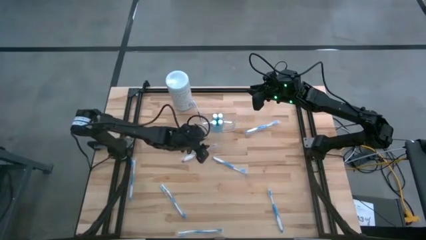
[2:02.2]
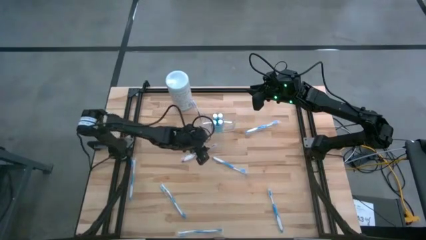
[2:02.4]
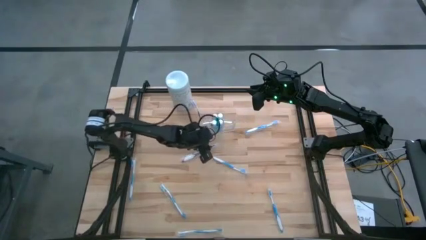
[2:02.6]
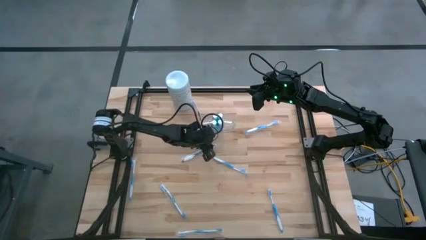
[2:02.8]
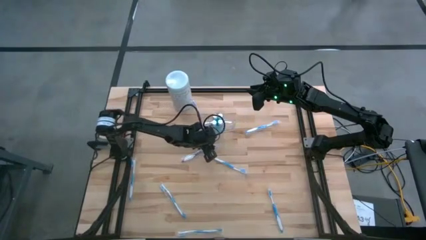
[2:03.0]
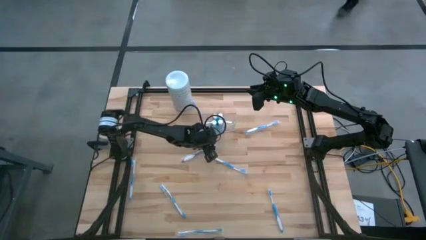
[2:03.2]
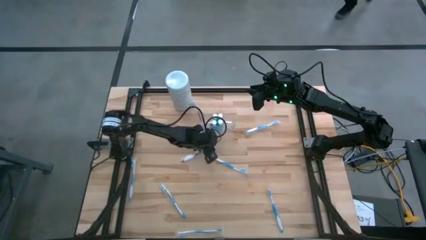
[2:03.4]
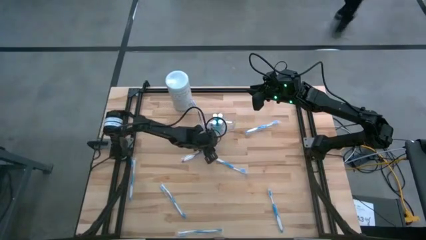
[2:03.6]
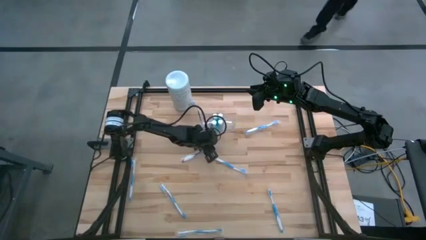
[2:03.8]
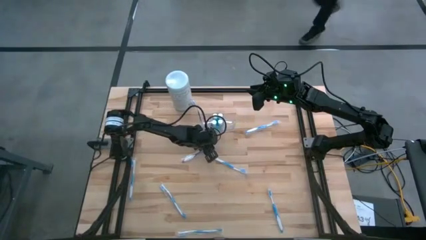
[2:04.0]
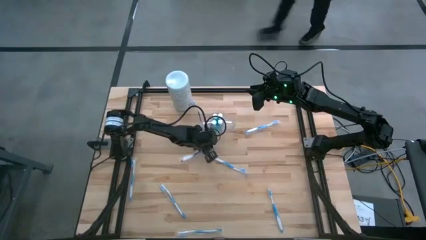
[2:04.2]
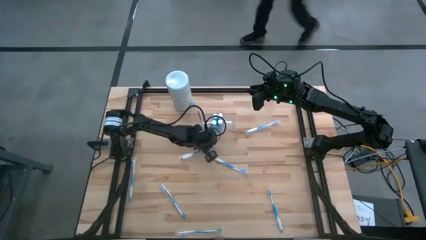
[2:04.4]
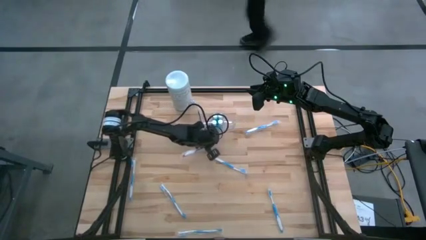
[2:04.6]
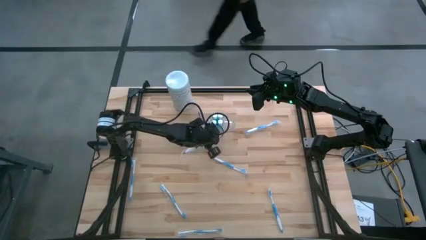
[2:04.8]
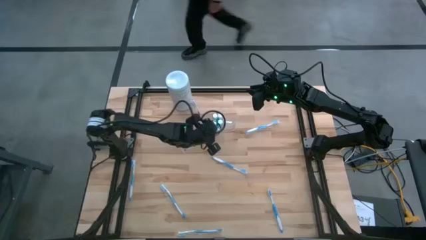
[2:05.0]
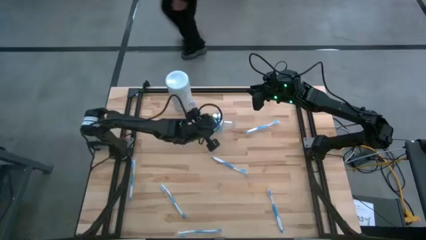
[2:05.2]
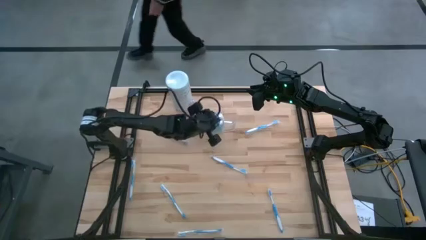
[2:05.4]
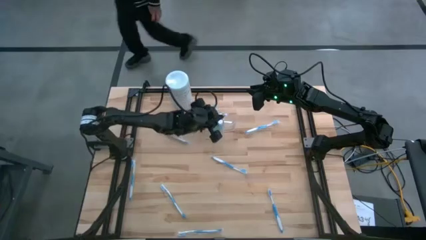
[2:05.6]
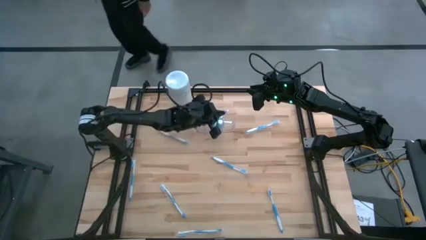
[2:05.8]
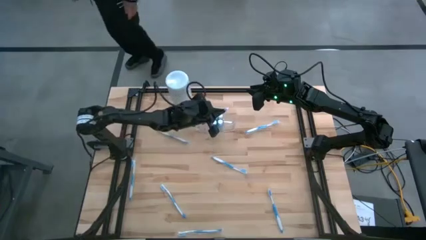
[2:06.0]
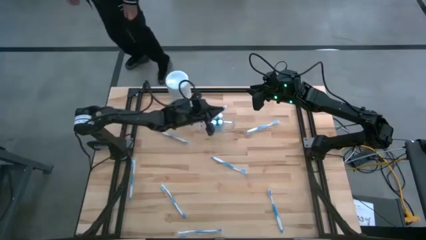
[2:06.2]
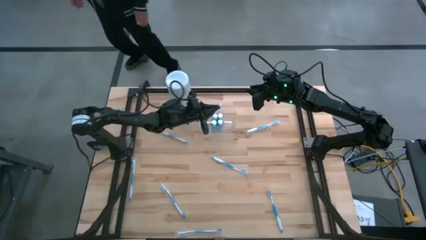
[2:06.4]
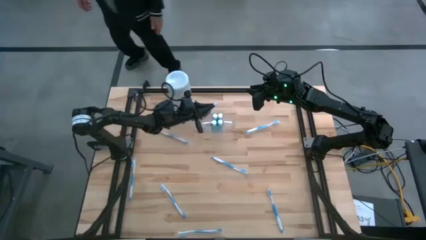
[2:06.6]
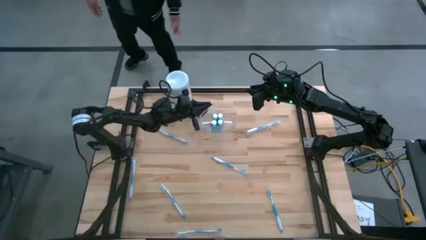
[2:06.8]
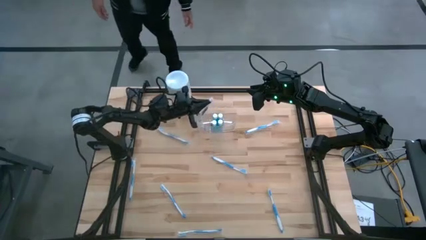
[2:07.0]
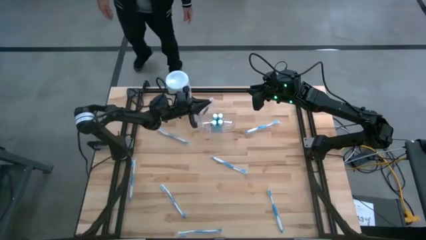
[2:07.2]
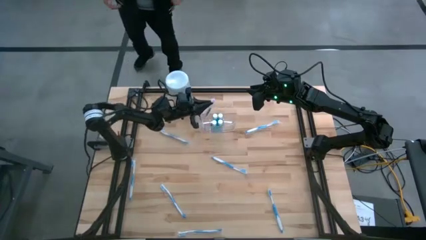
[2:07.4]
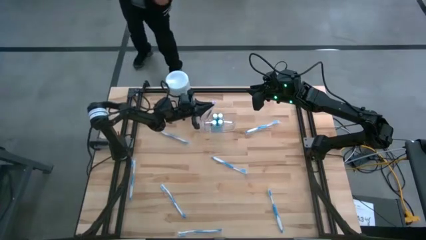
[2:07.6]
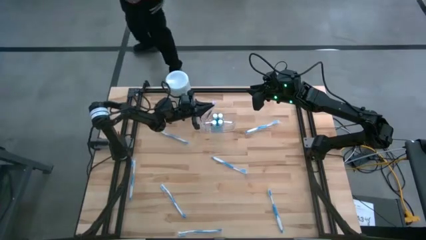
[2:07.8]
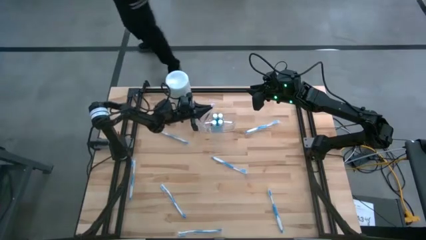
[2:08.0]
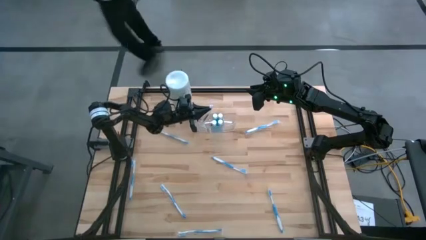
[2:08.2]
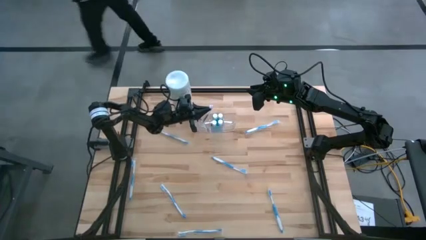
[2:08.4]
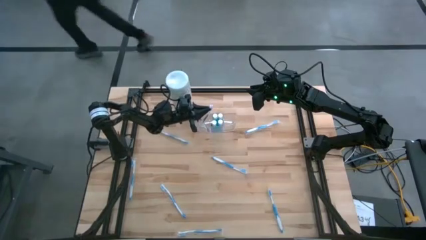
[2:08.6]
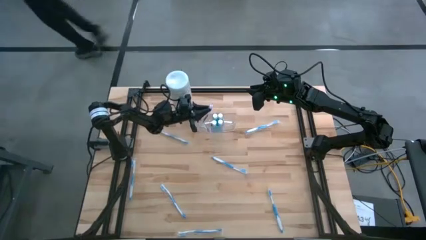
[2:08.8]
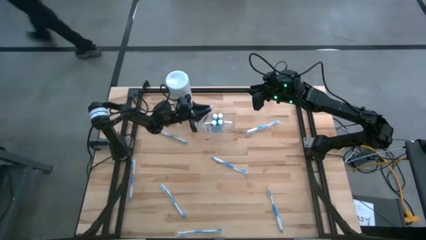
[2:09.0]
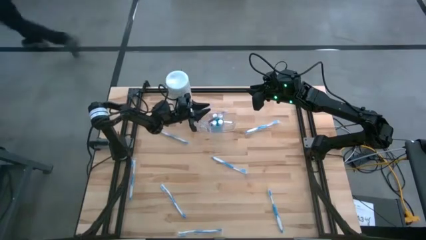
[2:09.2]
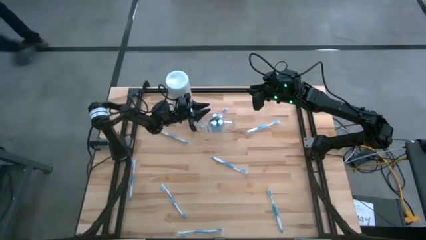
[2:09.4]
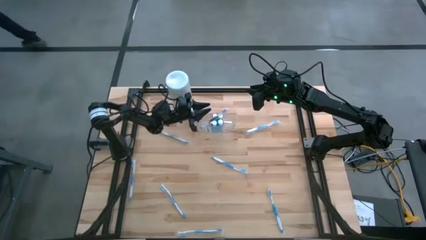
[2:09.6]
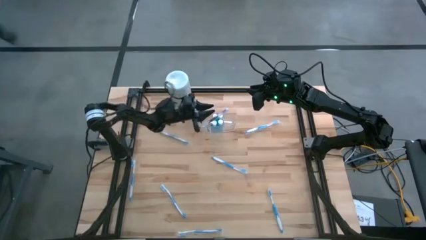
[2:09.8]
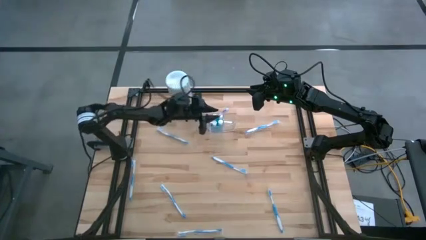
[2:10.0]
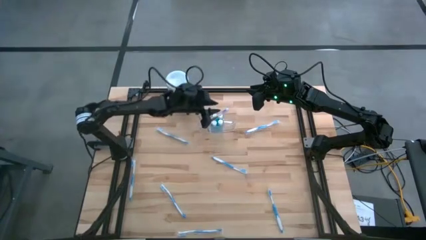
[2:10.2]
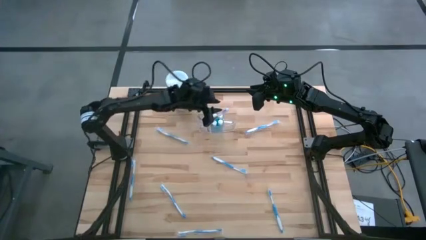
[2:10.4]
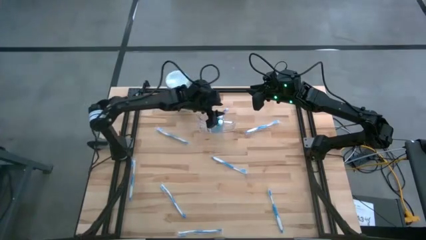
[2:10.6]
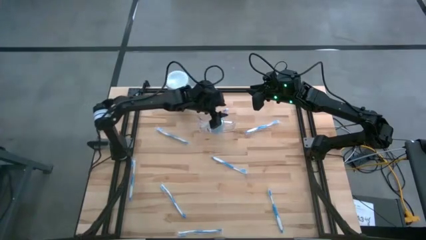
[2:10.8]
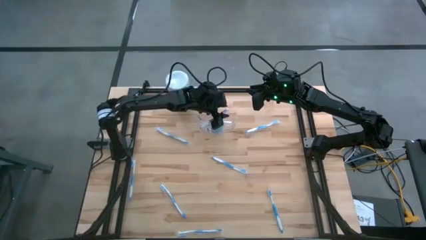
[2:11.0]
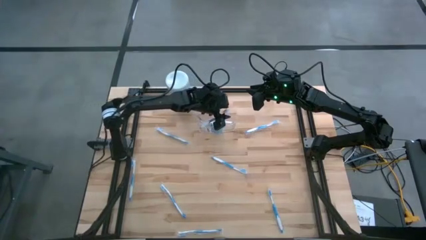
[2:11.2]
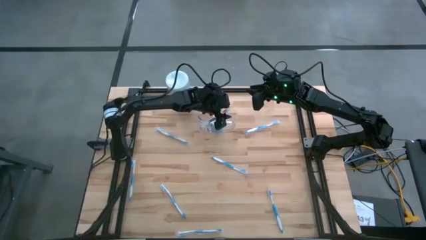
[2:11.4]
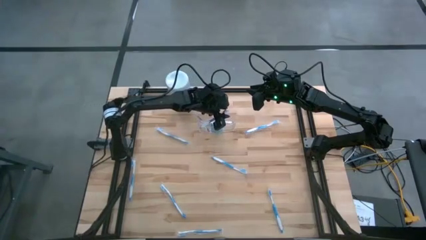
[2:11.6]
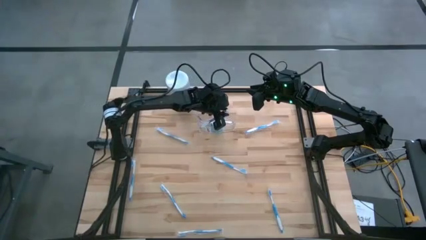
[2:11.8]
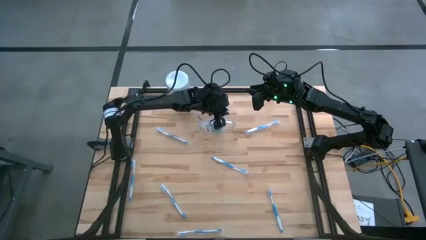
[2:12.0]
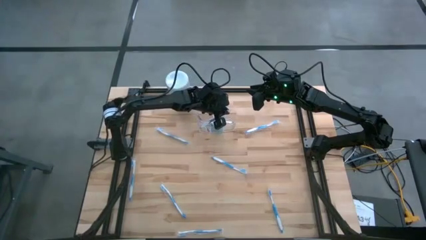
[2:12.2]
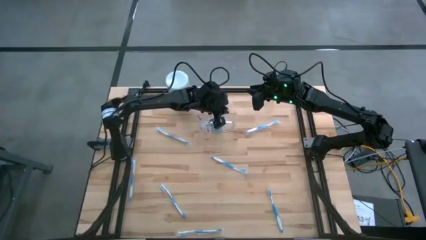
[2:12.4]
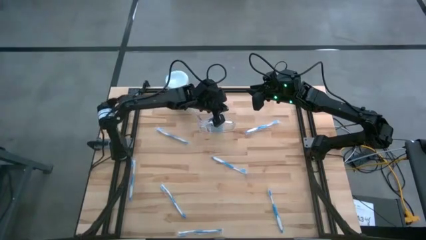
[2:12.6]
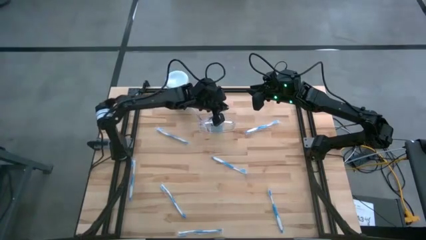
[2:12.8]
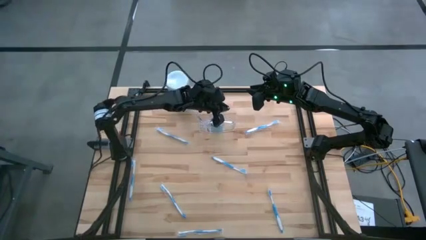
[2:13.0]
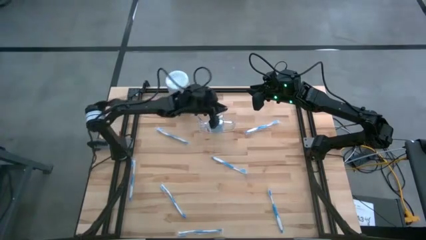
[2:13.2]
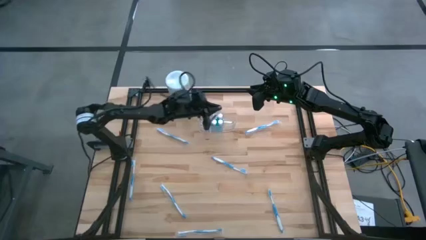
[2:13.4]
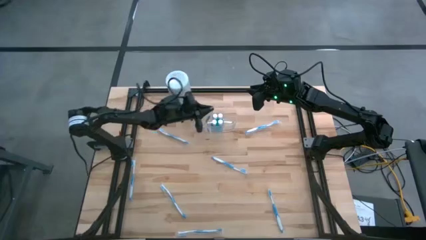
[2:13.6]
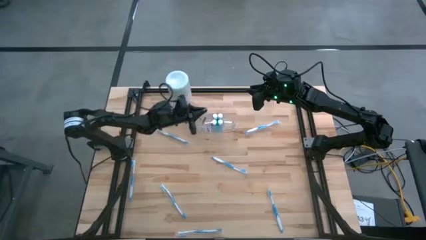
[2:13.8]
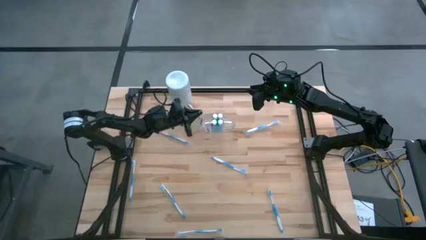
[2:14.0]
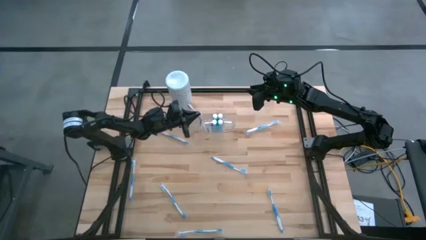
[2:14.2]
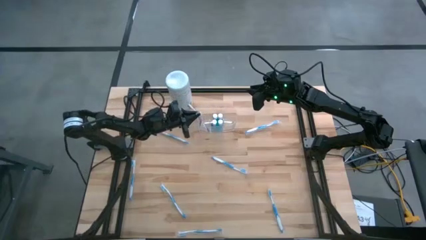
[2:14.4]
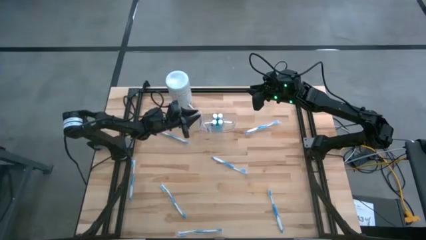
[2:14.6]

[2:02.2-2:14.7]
Task: Pick & Place toothbrushing station
Put the violet toothbrush into the left of the transparent organizer

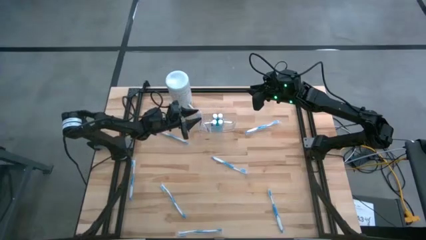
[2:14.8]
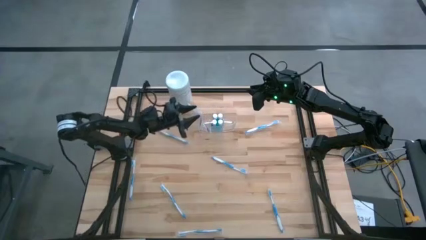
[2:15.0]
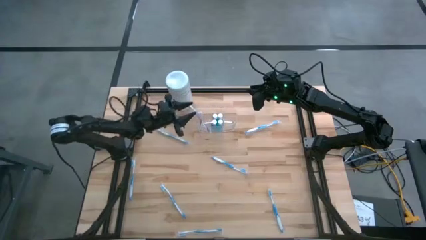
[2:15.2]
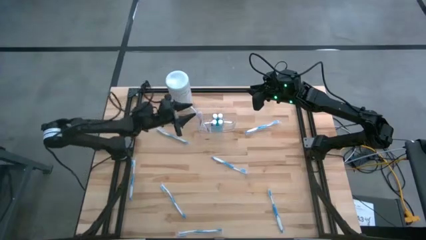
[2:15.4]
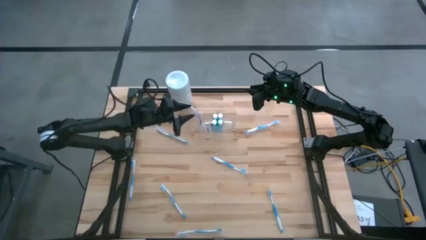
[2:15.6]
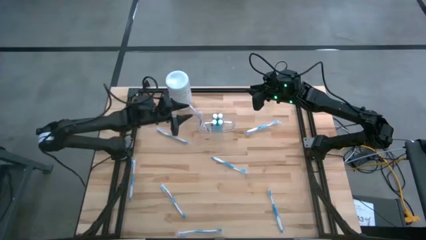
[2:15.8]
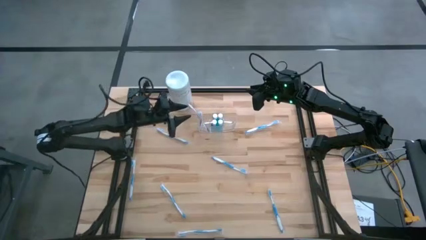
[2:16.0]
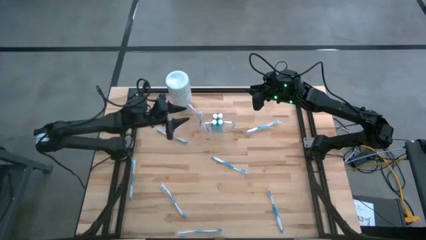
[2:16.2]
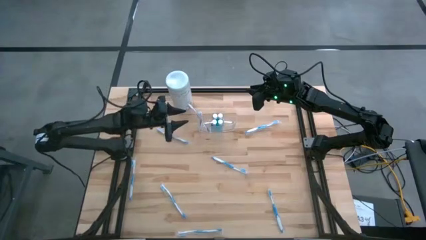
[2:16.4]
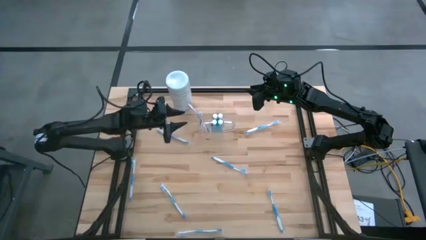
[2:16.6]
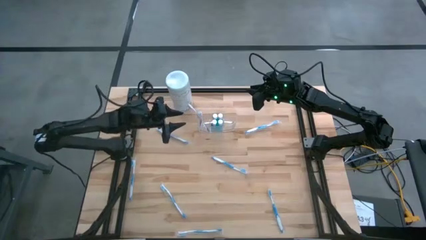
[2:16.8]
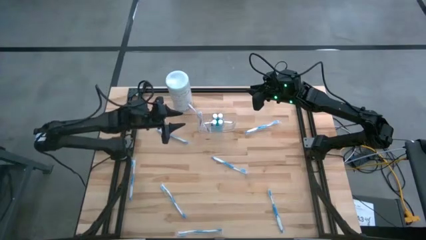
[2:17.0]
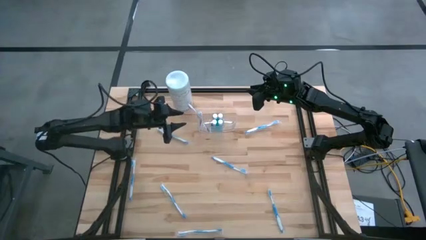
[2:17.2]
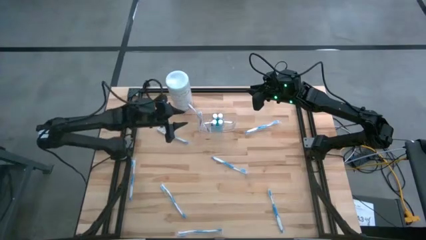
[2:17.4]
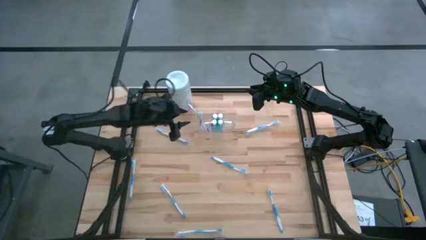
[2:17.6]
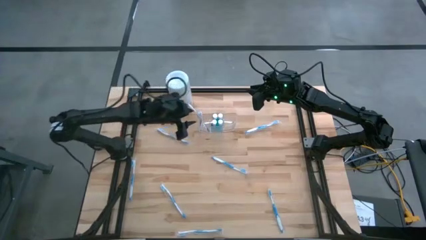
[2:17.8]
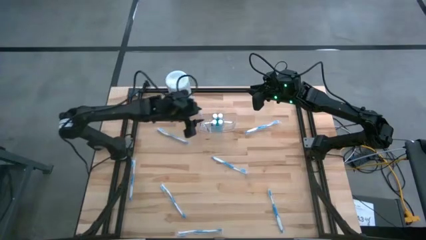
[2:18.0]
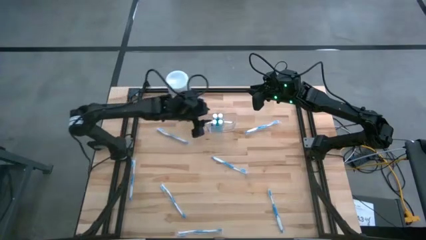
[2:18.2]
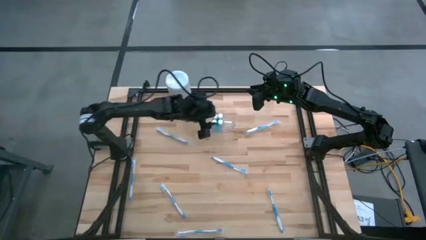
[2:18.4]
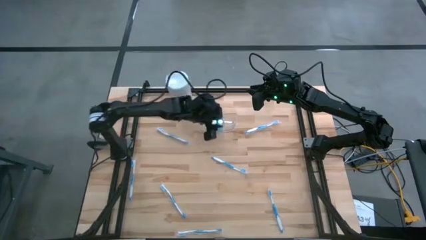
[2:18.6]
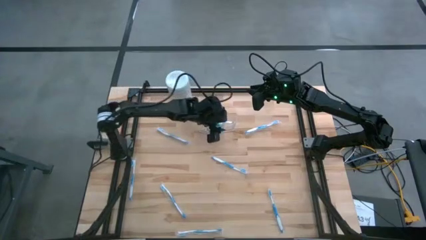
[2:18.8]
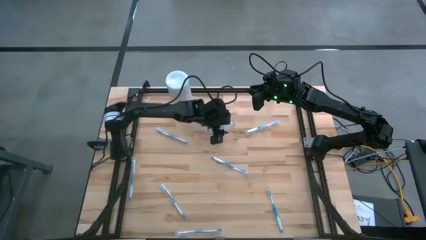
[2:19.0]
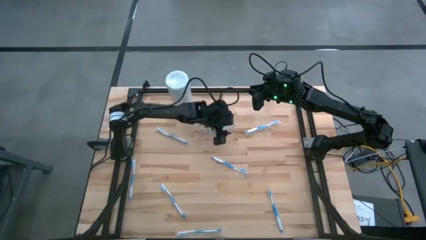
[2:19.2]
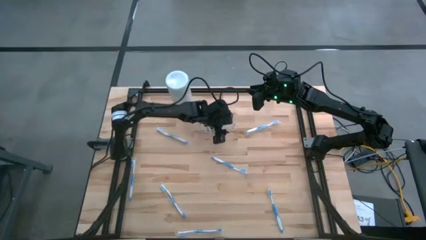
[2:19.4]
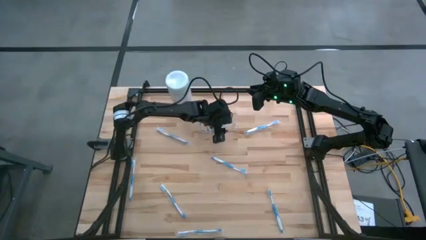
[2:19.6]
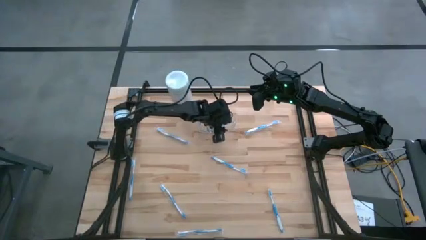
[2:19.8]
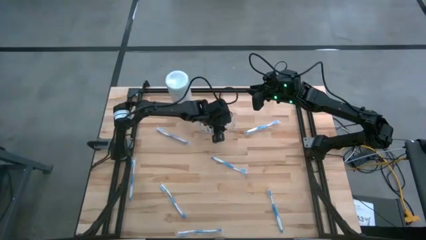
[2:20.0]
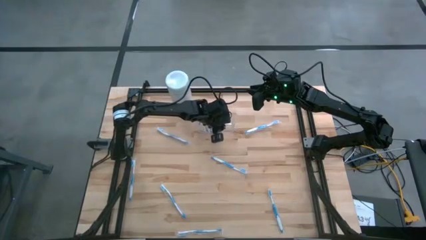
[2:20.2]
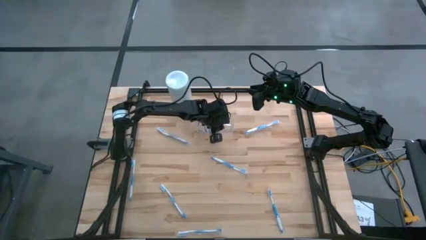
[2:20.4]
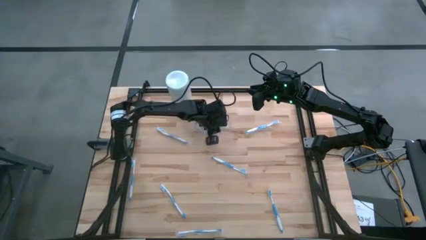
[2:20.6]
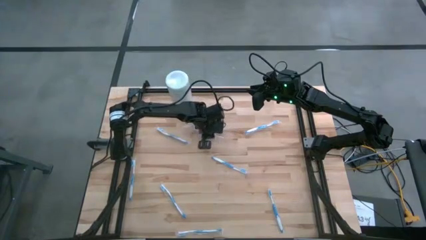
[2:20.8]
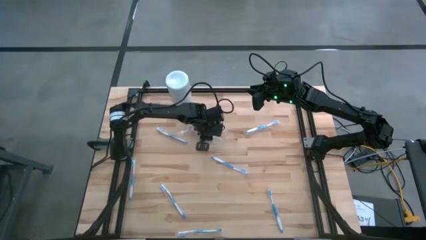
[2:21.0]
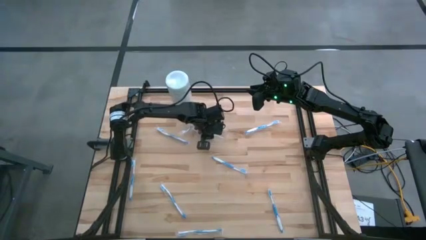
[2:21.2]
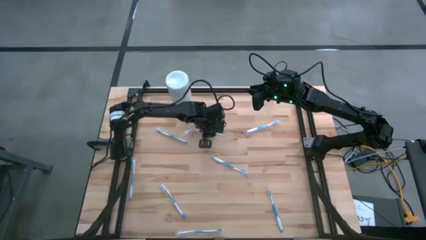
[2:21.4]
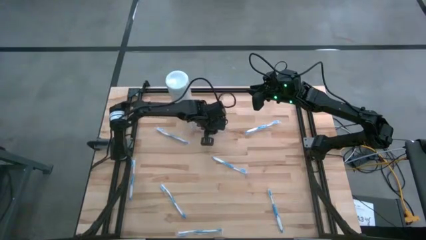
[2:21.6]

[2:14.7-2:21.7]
Adjust the transparent organizer
